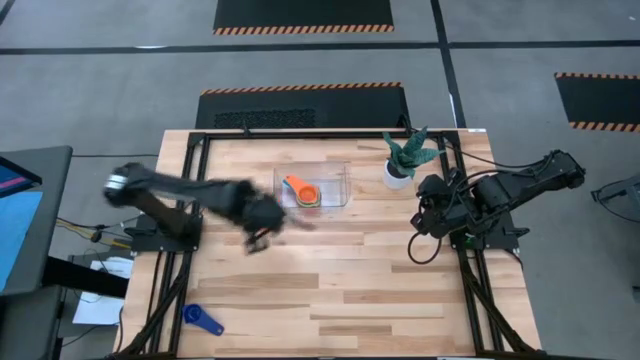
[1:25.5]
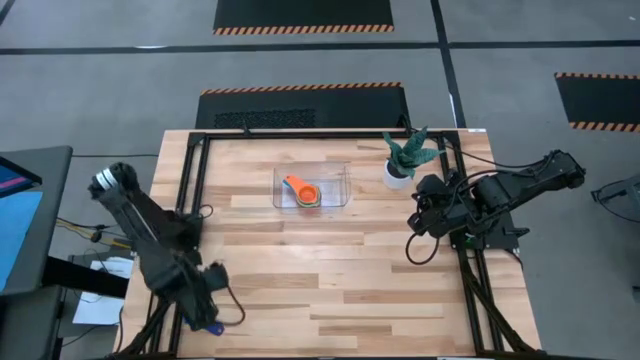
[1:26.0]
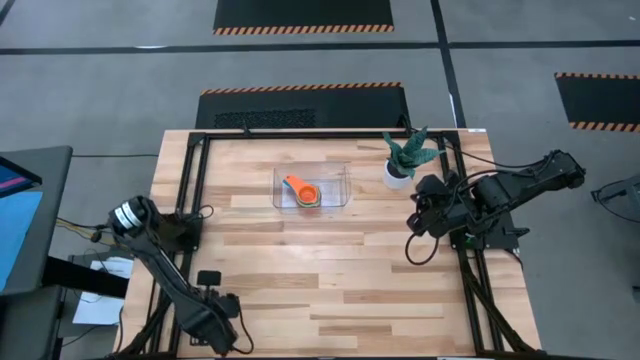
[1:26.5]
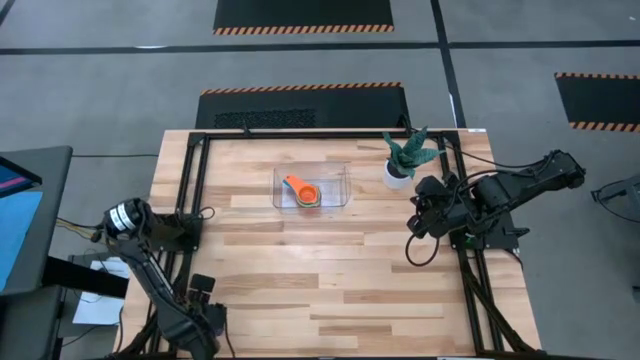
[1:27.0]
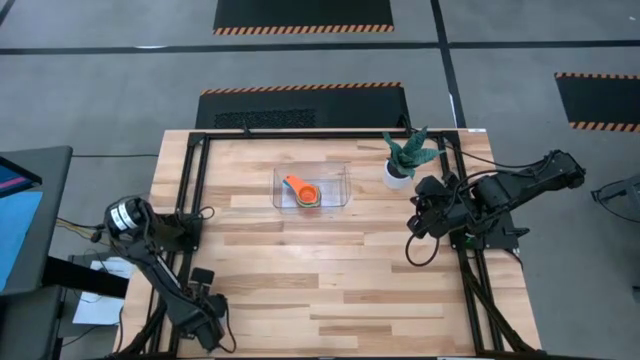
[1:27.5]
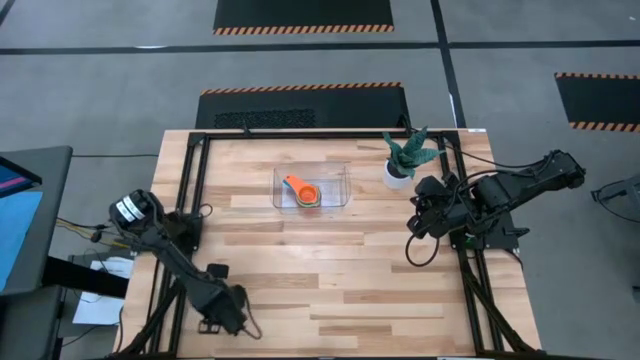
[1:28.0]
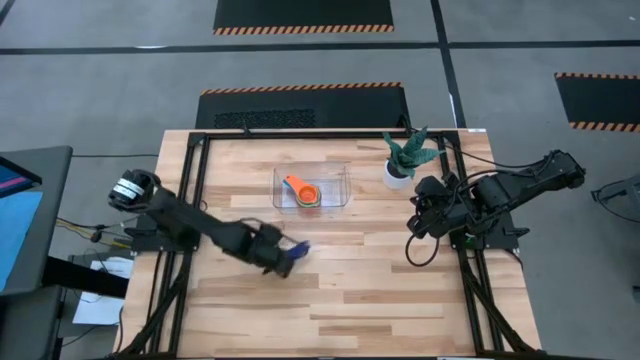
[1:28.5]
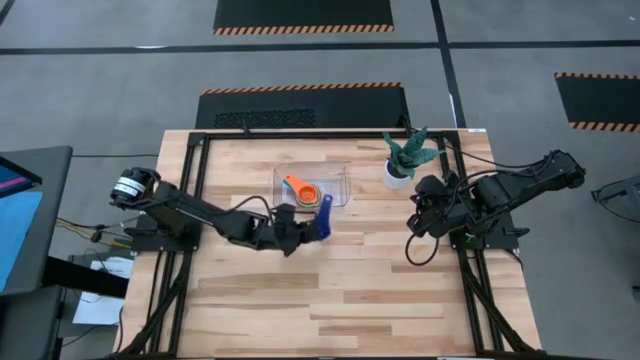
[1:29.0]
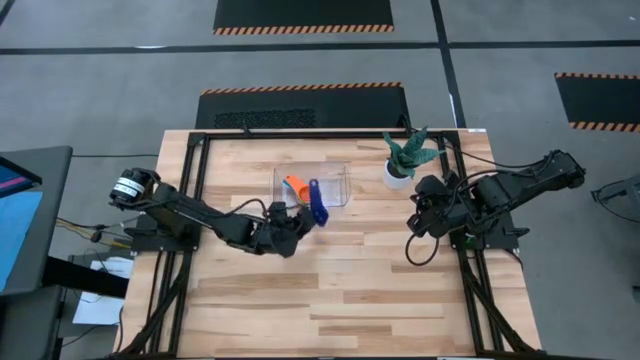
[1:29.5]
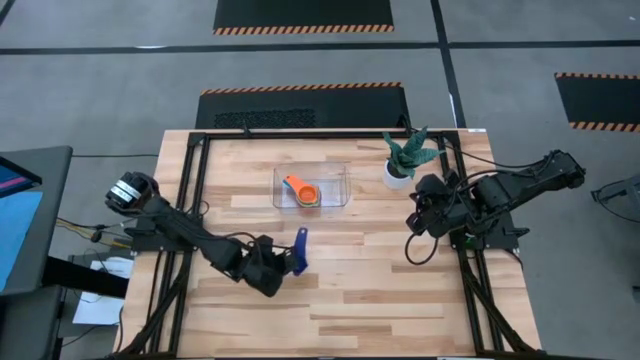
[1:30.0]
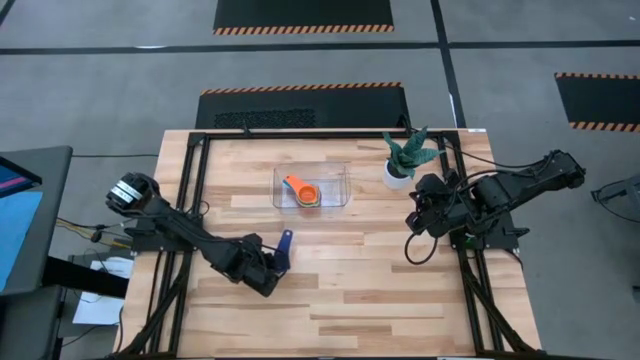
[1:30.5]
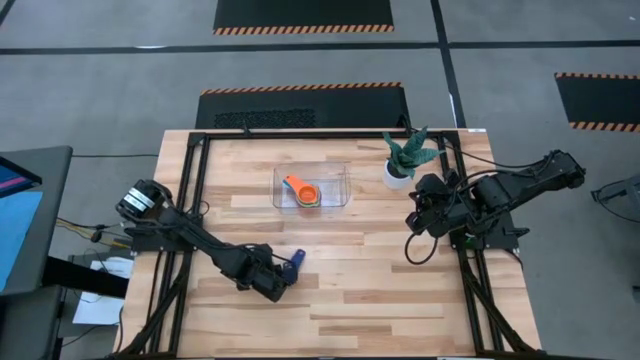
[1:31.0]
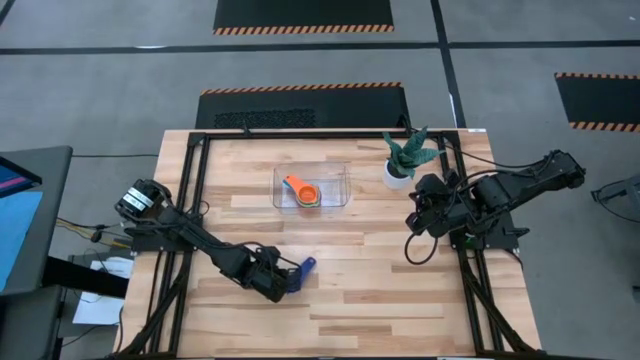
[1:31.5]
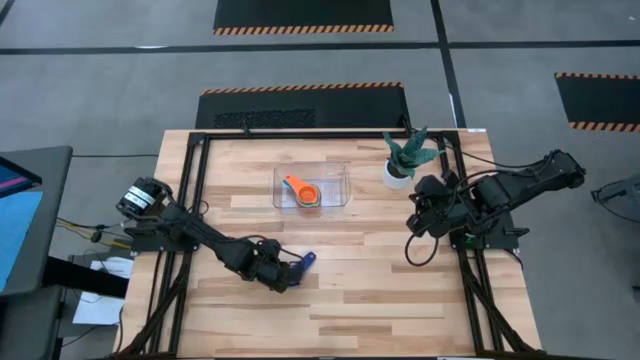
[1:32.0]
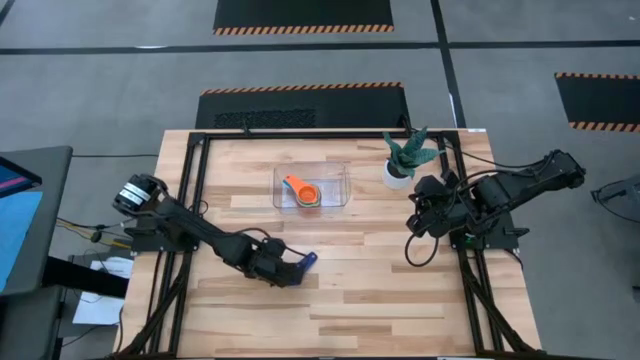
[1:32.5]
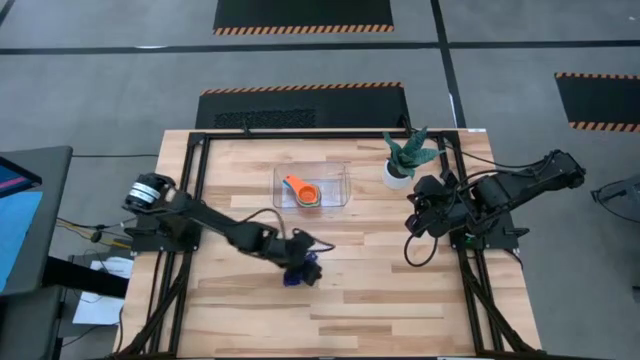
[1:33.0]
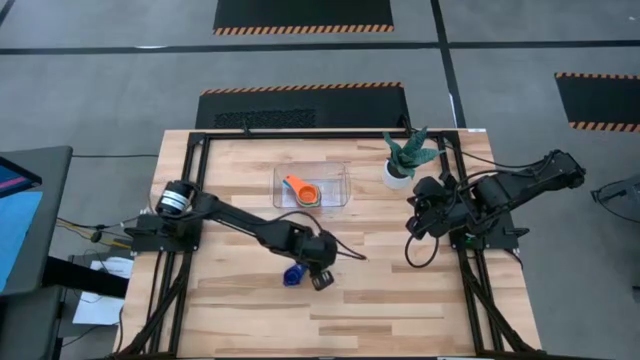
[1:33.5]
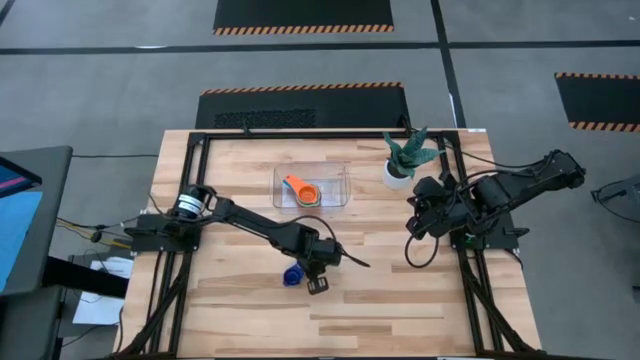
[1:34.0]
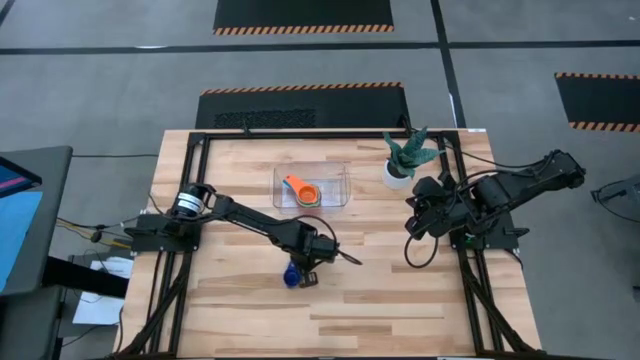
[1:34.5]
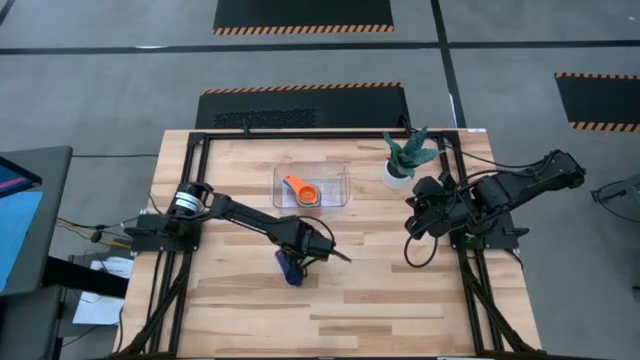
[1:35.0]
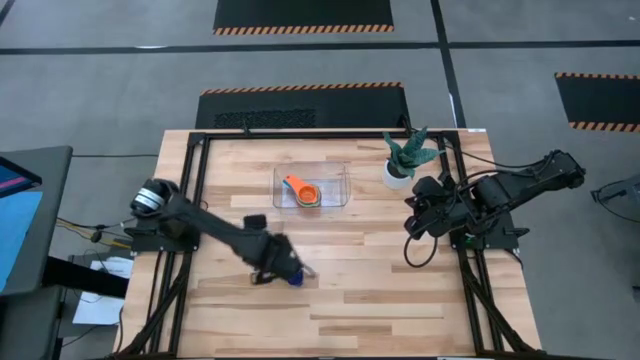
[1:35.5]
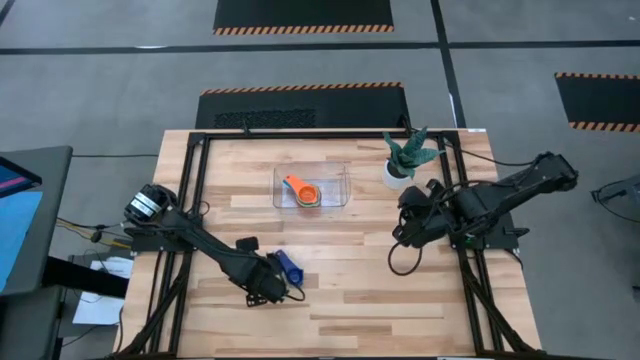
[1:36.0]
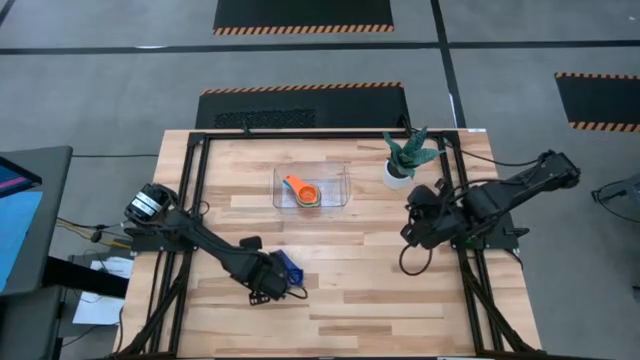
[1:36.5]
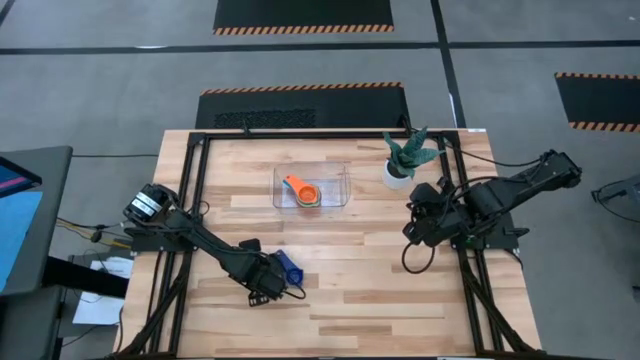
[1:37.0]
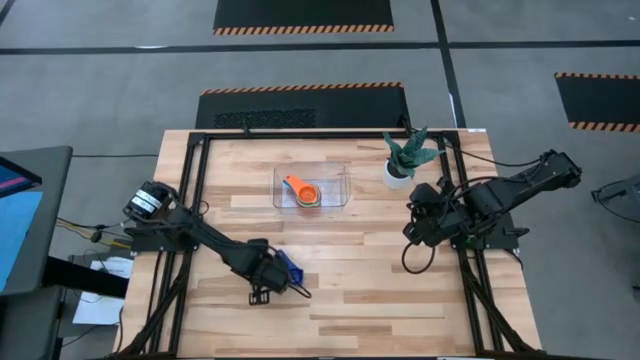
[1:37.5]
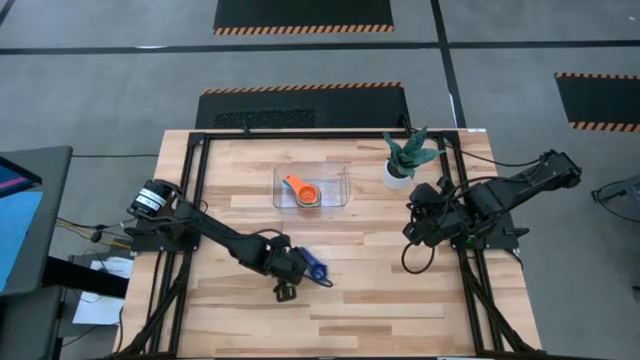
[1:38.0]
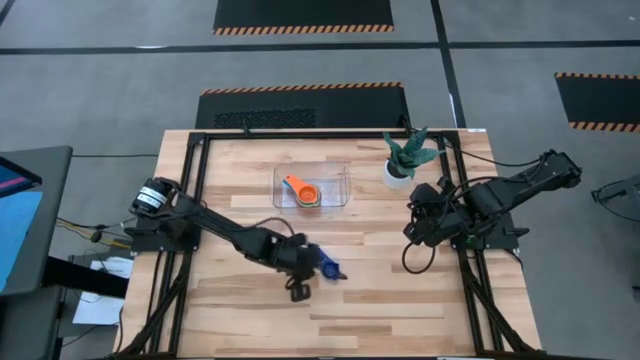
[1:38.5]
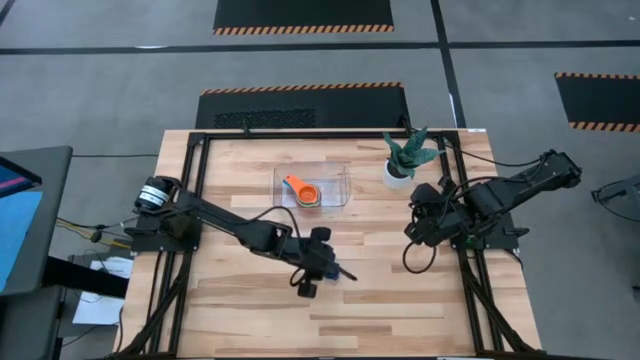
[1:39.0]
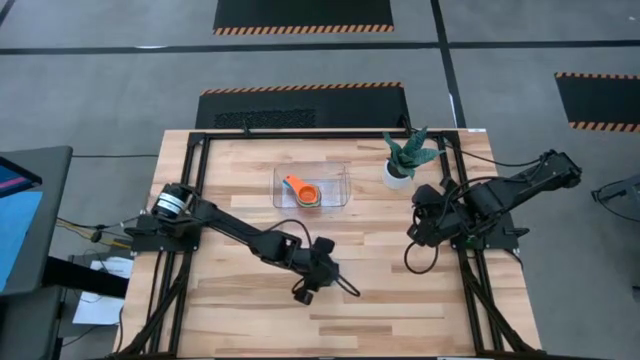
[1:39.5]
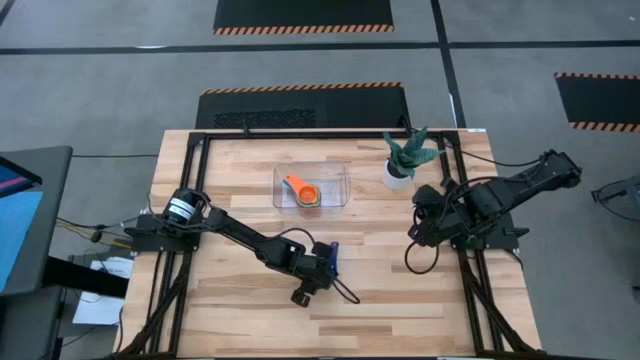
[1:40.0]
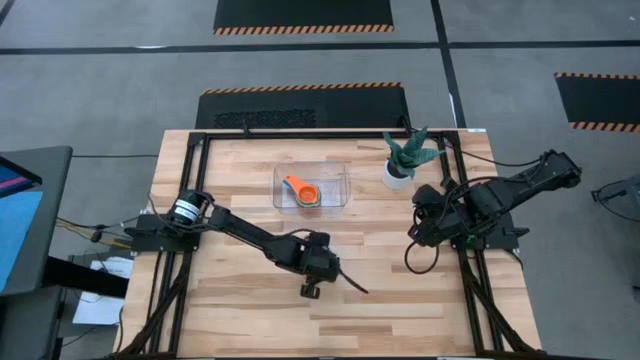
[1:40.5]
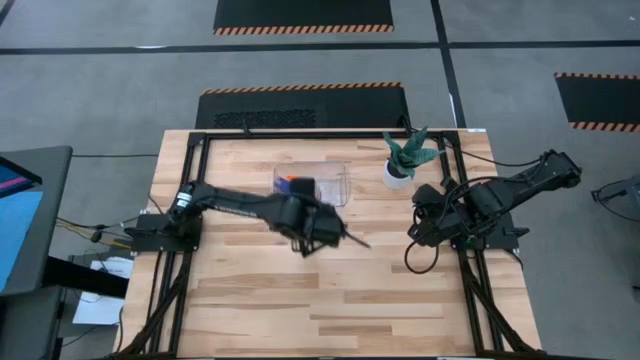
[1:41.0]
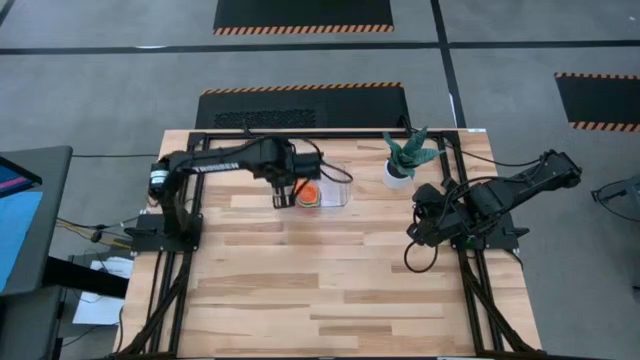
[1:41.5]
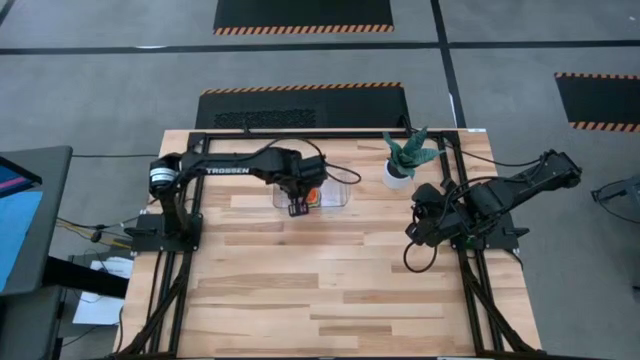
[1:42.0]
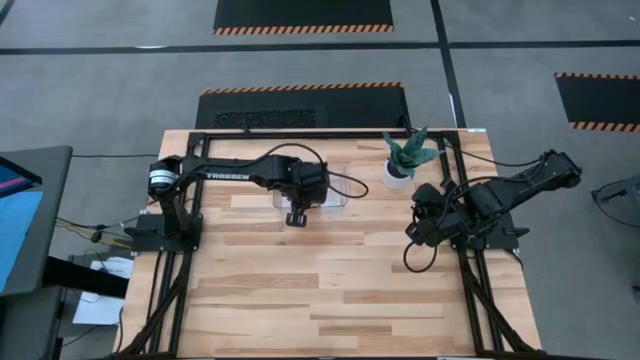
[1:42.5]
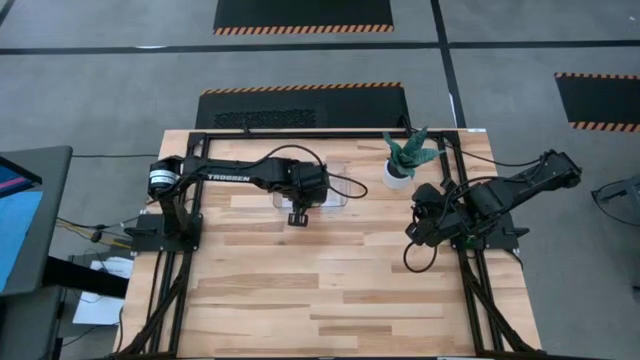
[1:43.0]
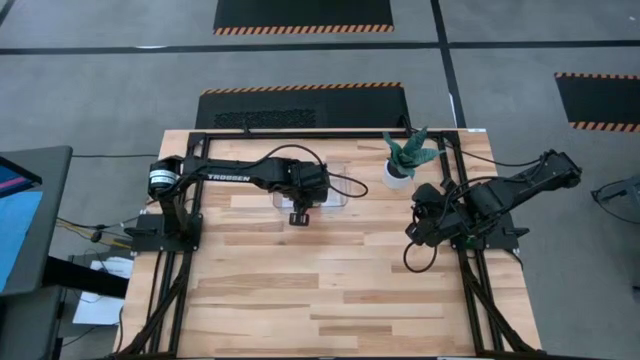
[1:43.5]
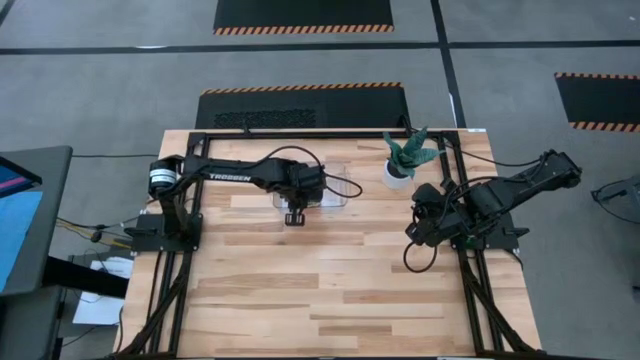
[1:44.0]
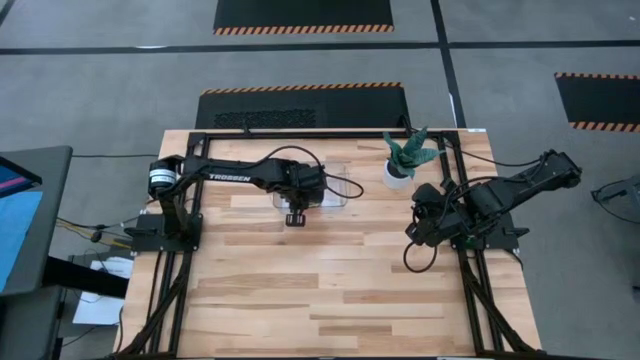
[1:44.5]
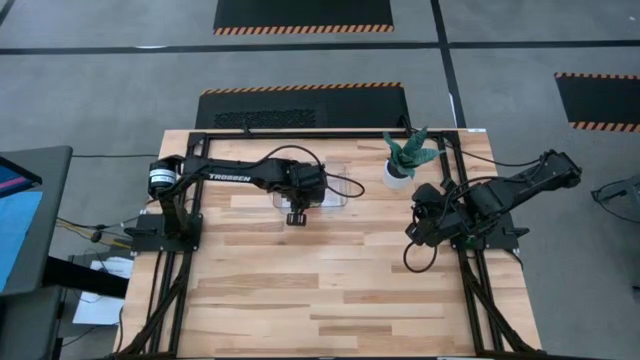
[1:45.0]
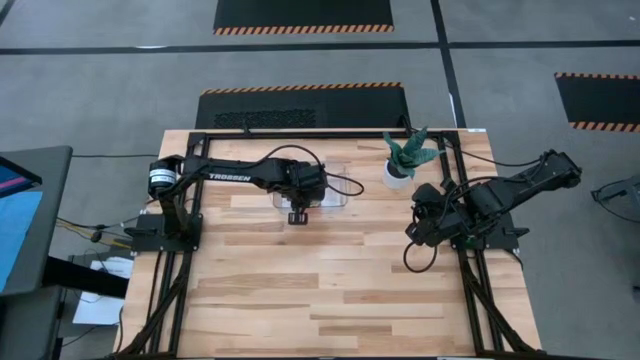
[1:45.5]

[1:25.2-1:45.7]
Task: Nest measuring cups in basket
Stack the blue measuring cup on top of the orange measuring cup in the transparent bin
